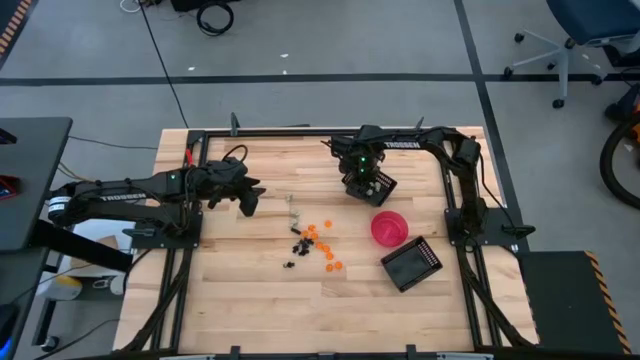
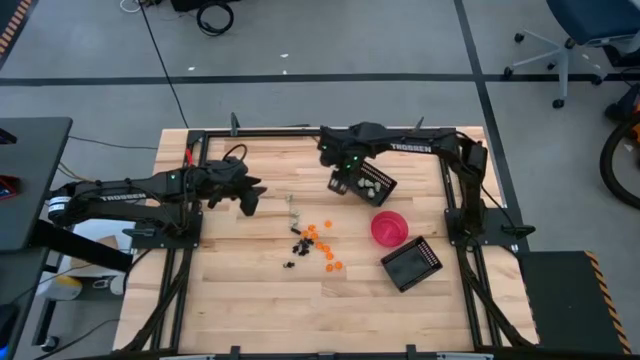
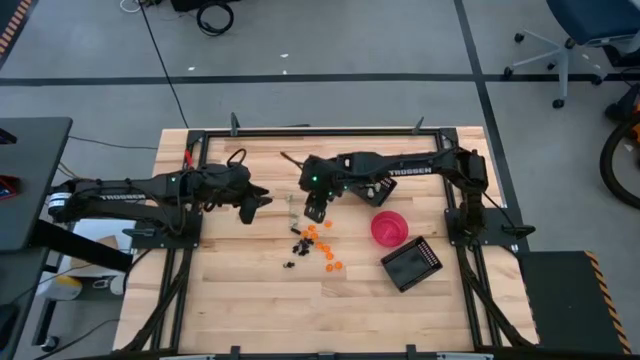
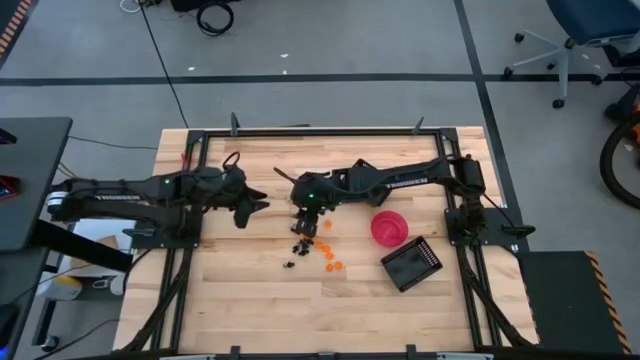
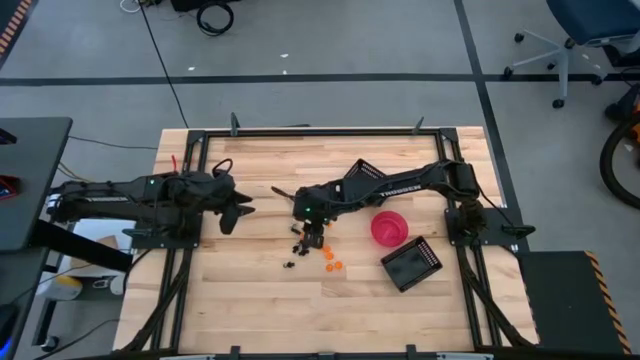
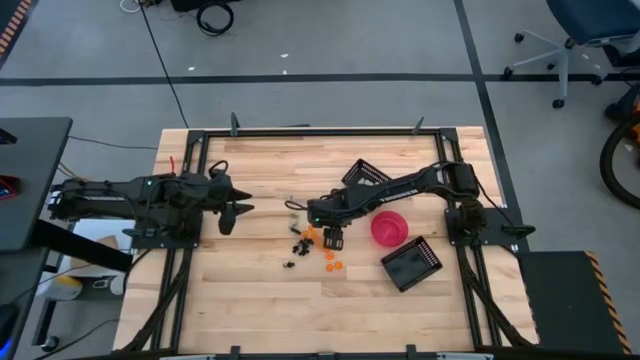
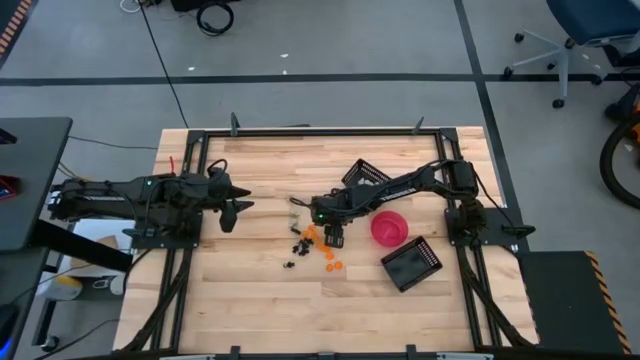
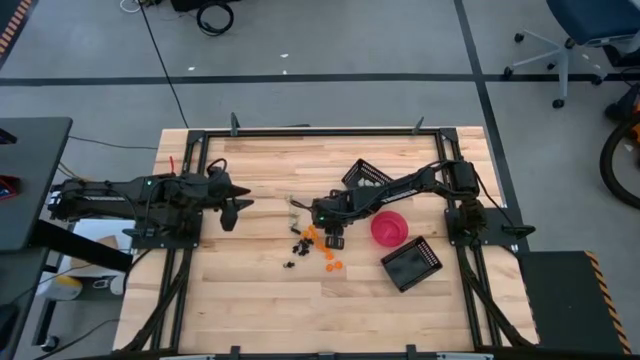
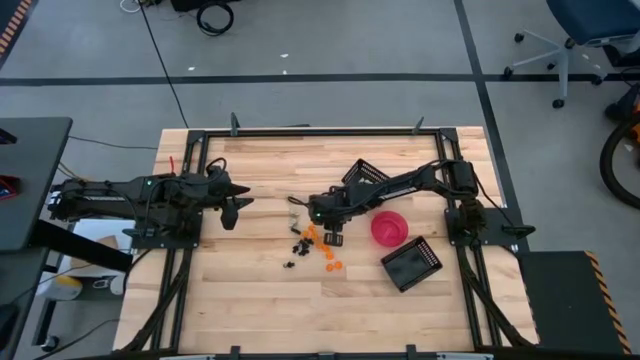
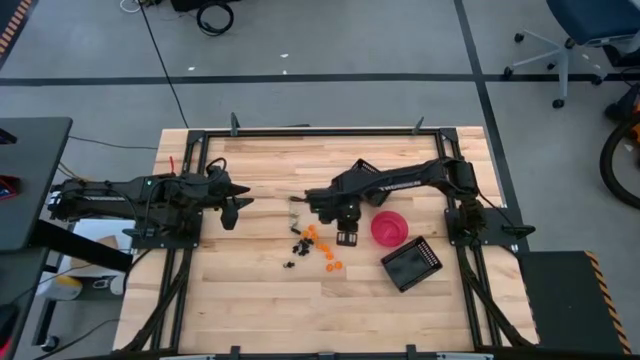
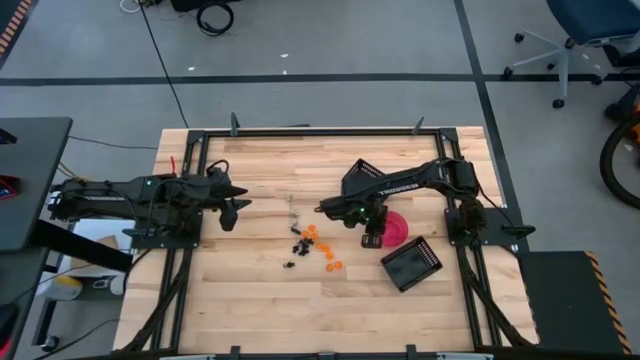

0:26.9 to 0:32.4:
Task: Sort Halloween decoration
Put the orange pumpkin toy into the red bowl

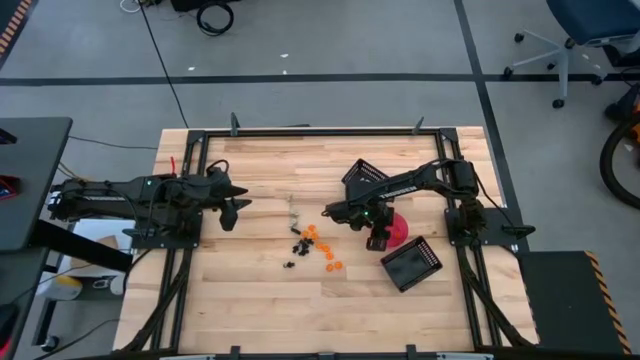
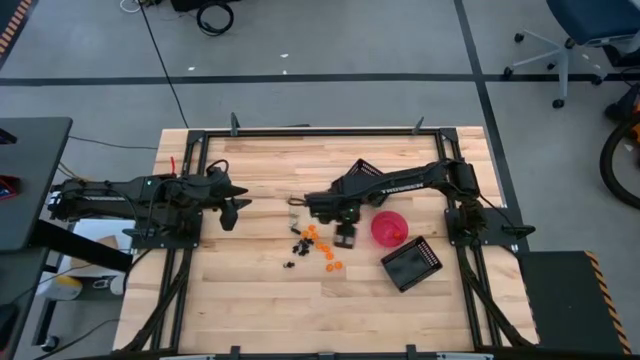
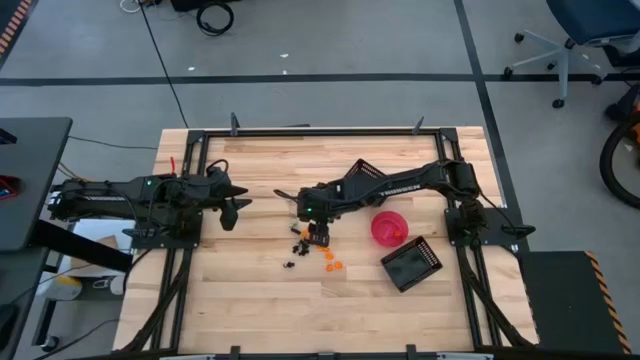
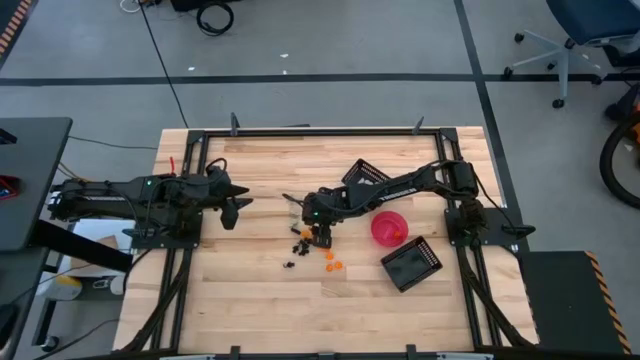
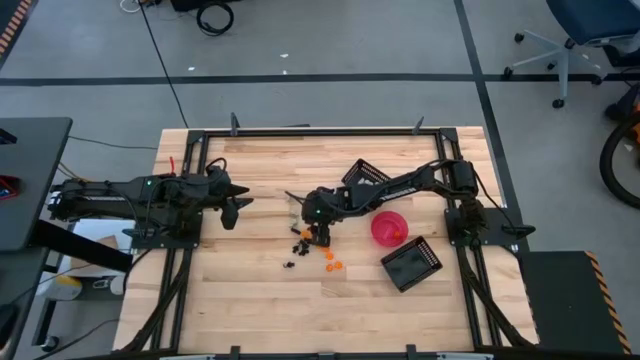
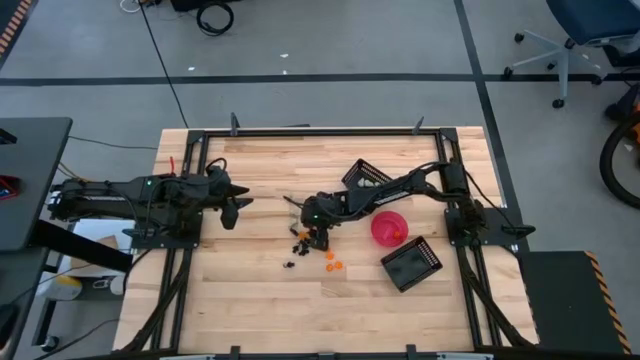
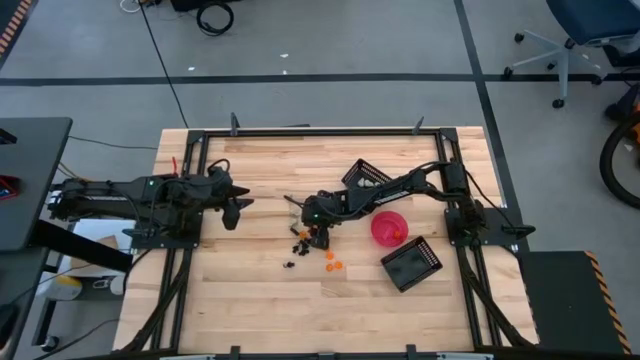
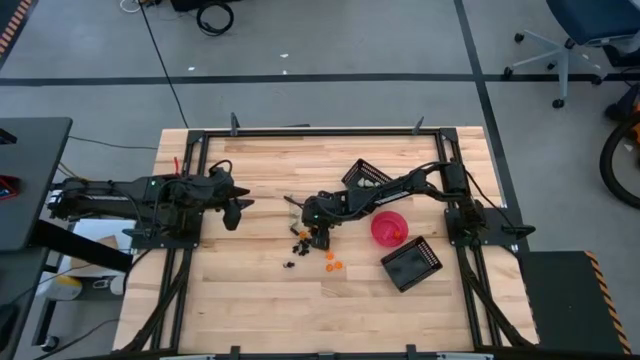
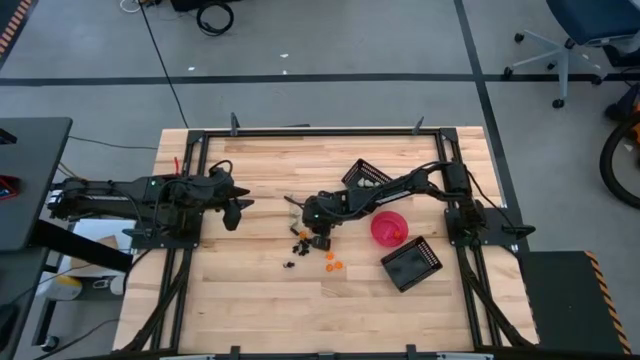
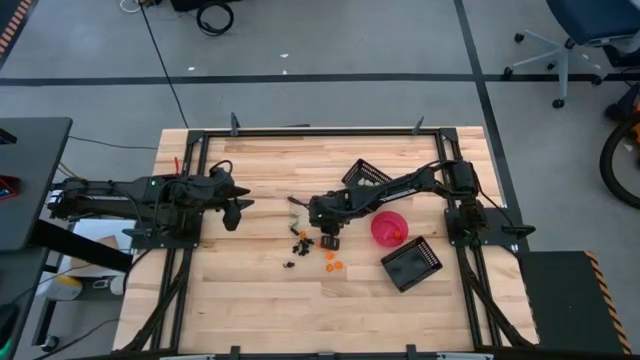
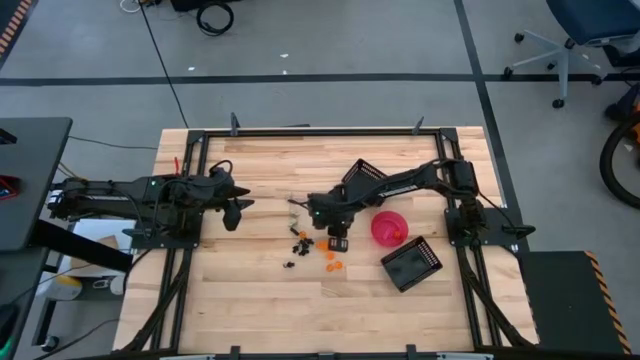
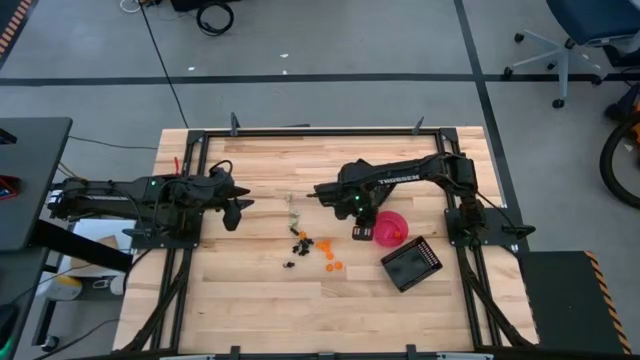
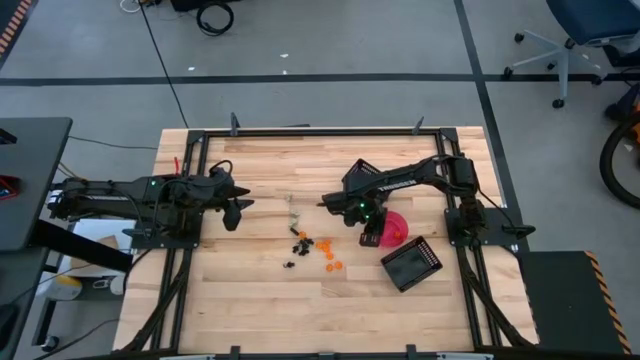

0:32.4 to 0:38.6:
Put the orange pumpkin toy into the red bowl

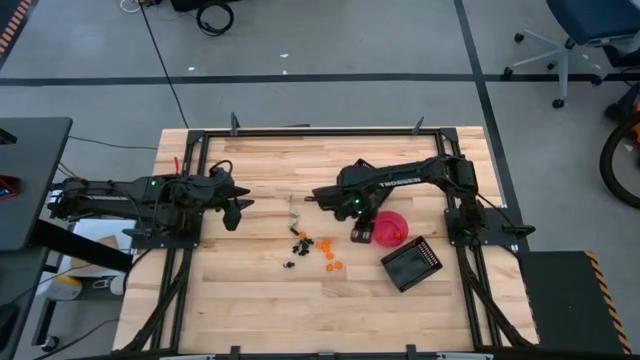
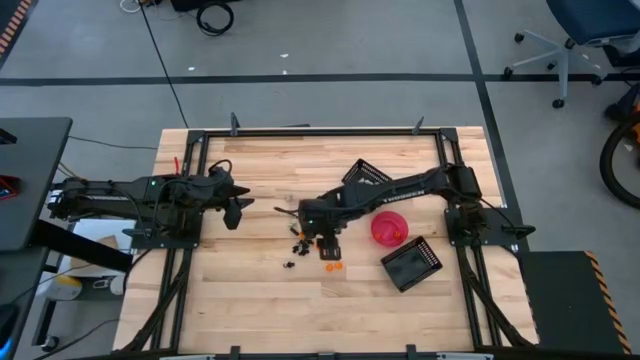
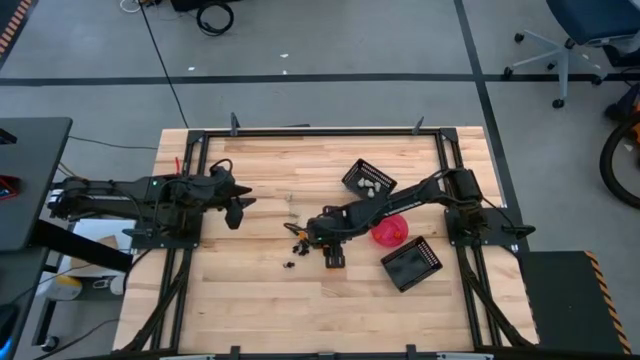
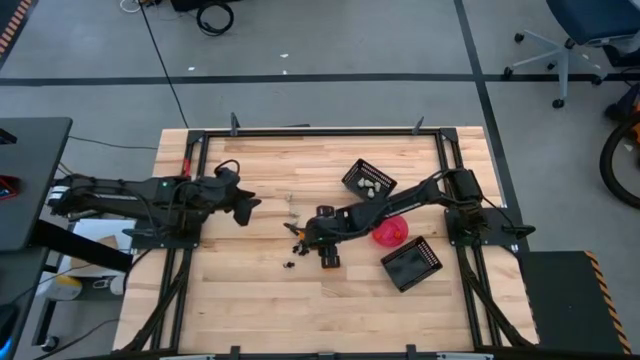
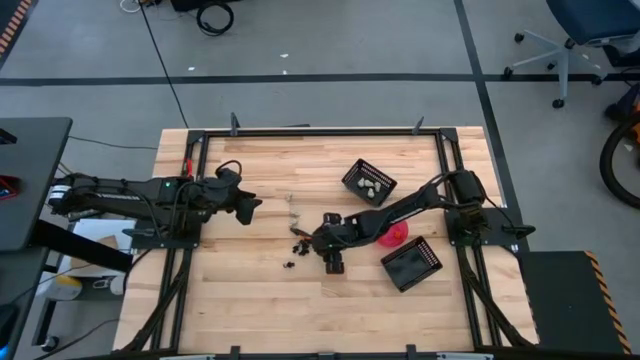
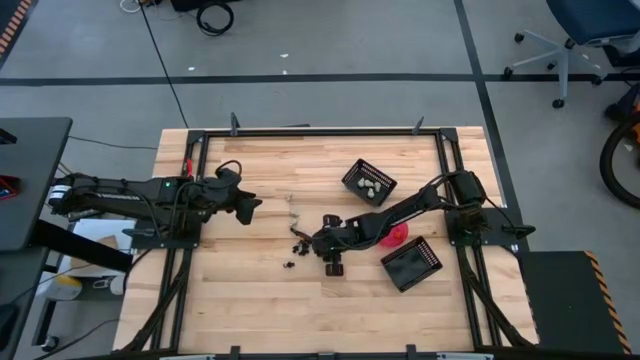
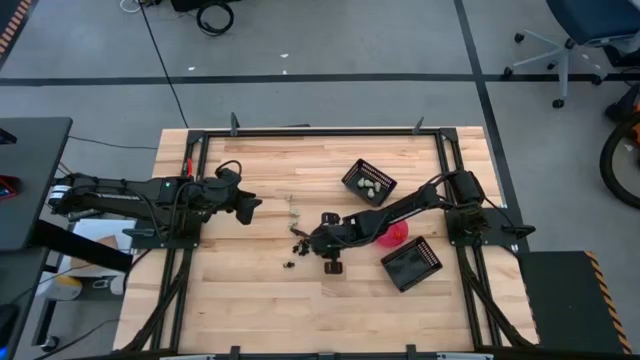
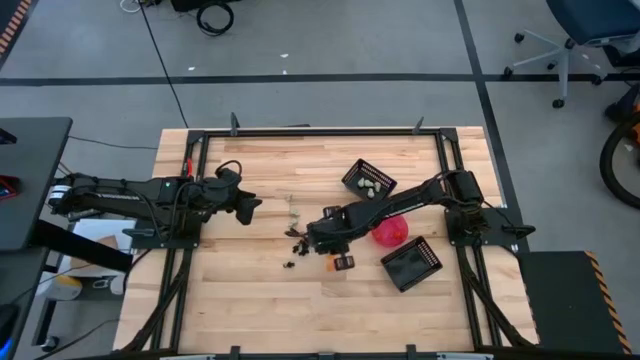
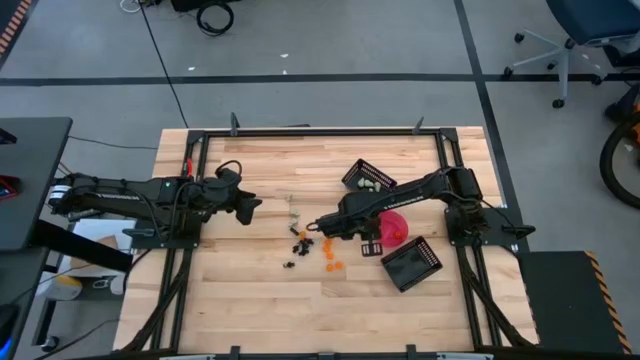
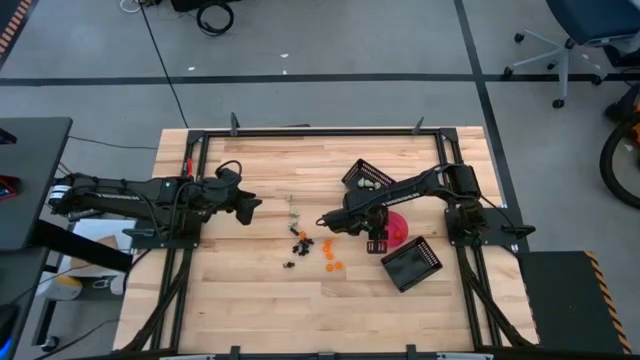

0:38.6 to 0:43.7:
Put the orange pumpkin toy into the red bowl

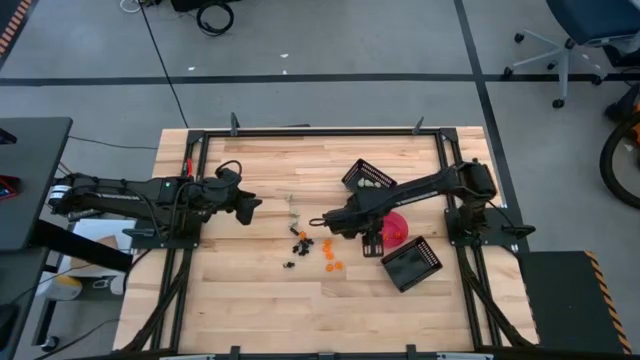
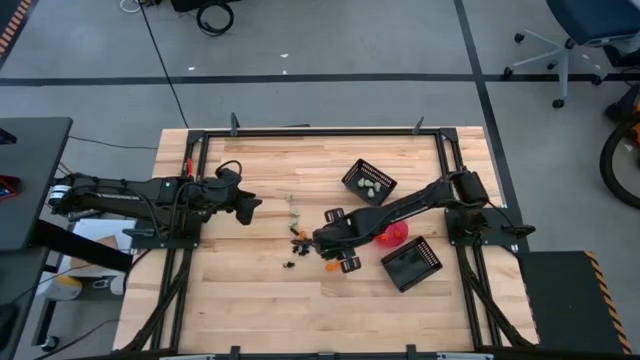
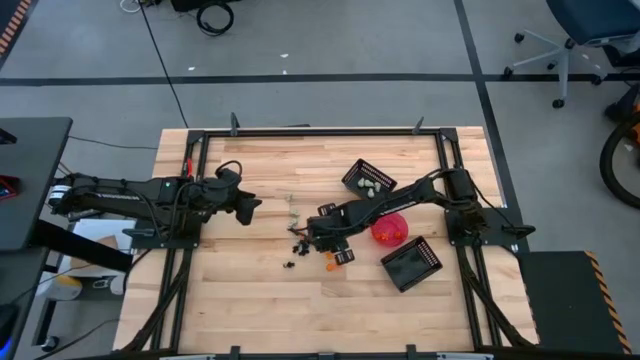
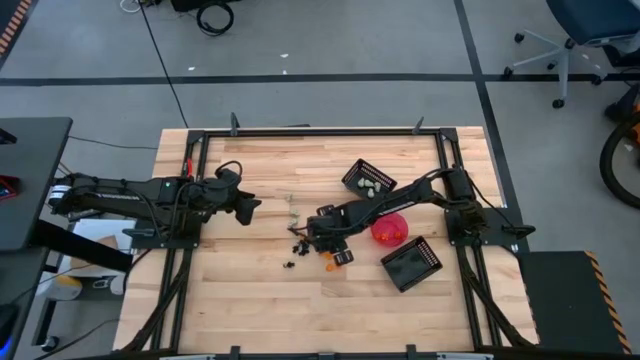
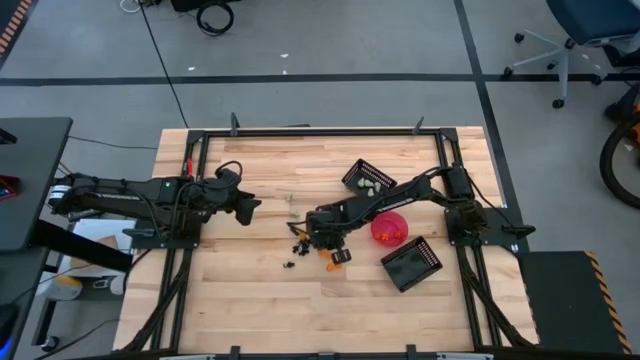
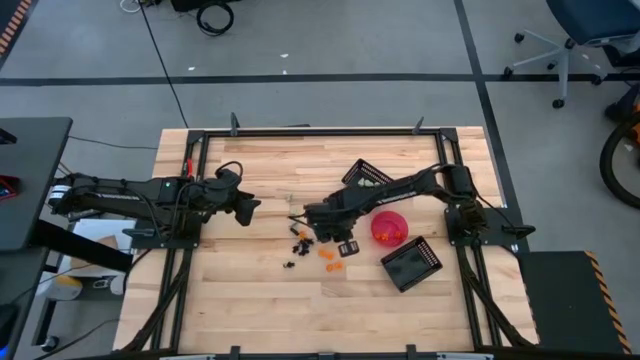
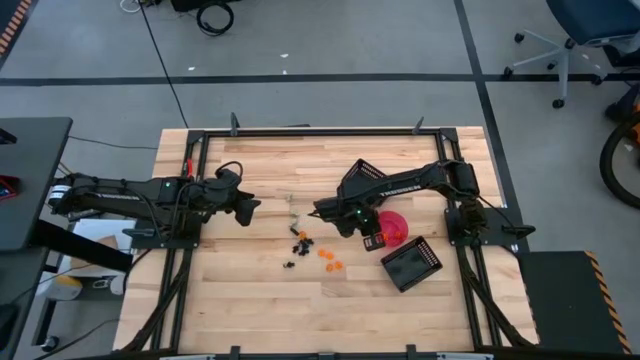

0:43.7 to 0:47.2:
Put the orange pumpkin toy into the red bowl

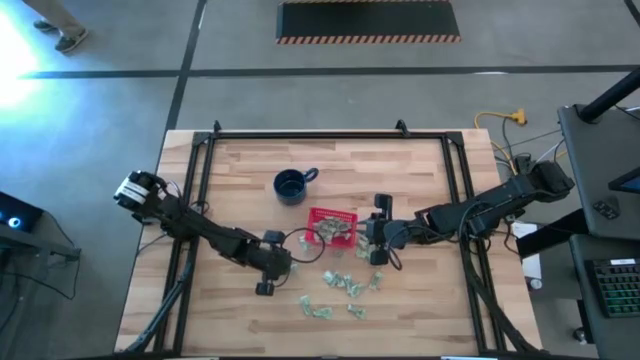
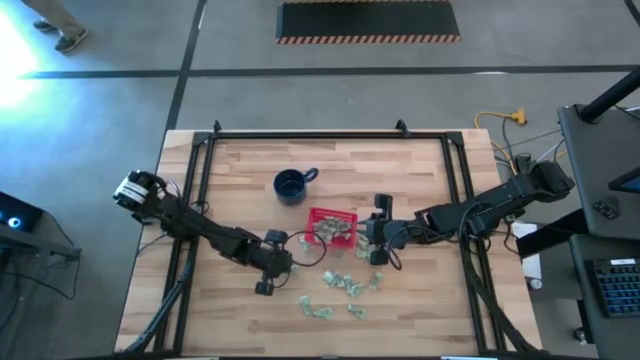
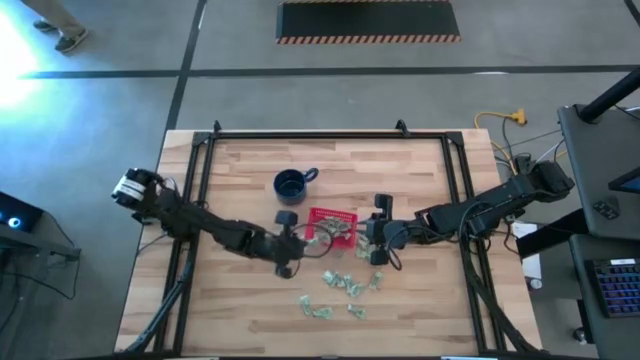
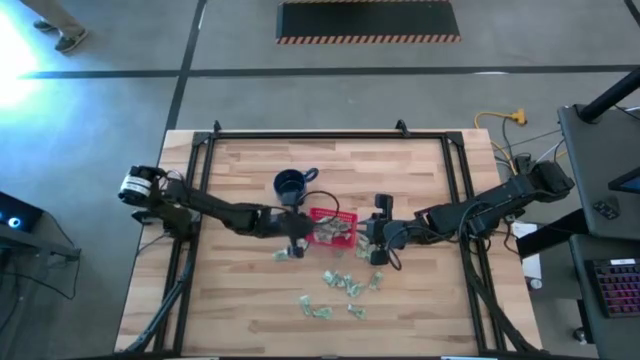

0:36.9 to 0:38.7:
Task: Pick and place Stevia / Truvia into bins
Put the white stevia packet into the red basket
